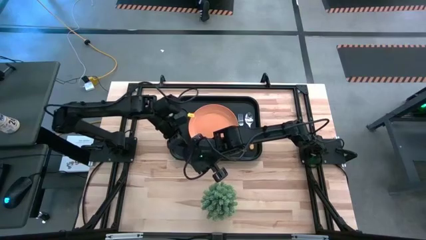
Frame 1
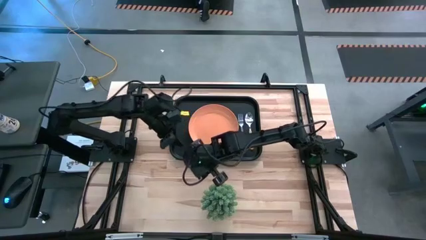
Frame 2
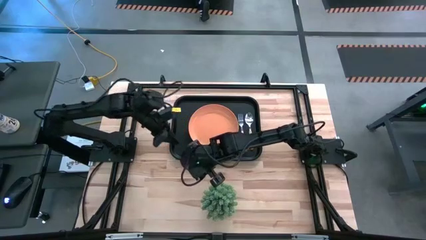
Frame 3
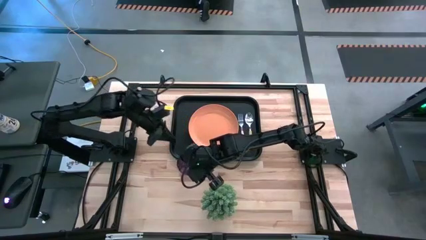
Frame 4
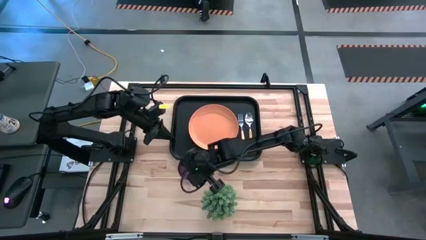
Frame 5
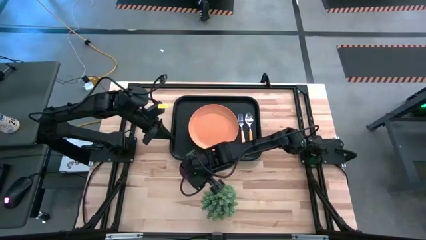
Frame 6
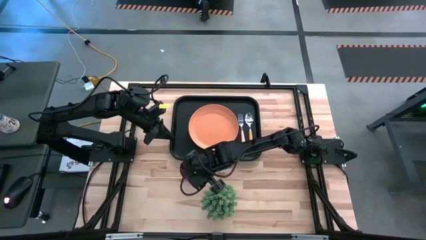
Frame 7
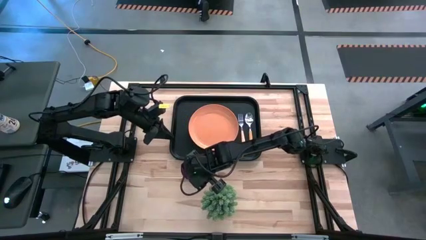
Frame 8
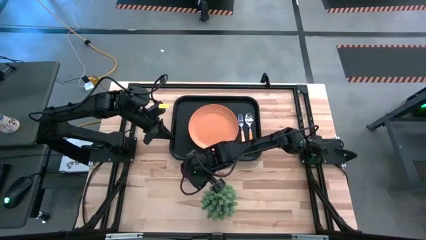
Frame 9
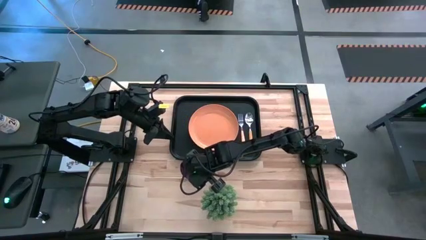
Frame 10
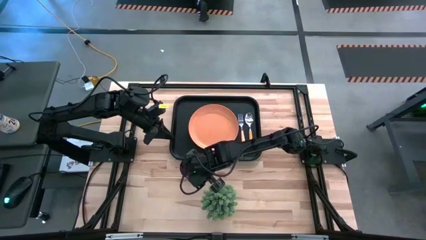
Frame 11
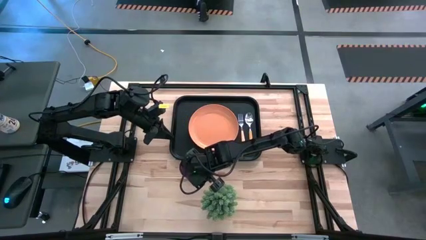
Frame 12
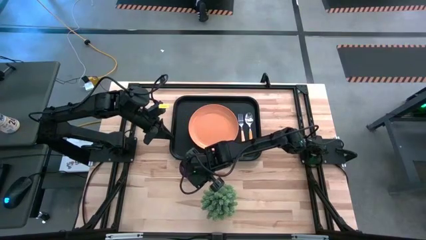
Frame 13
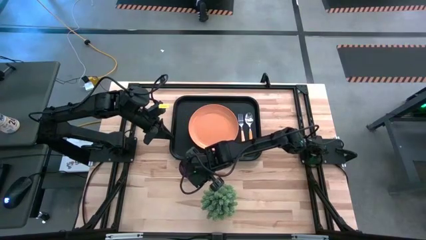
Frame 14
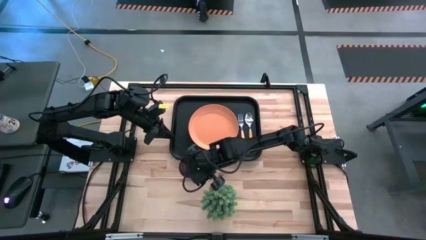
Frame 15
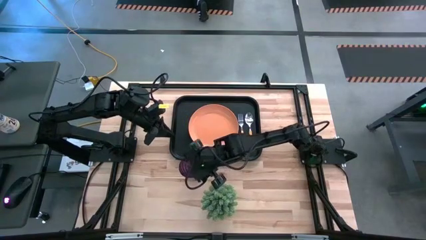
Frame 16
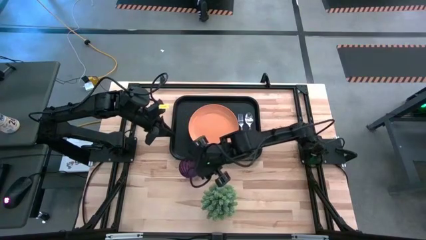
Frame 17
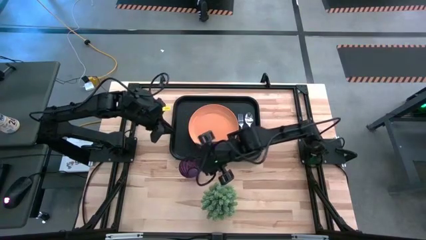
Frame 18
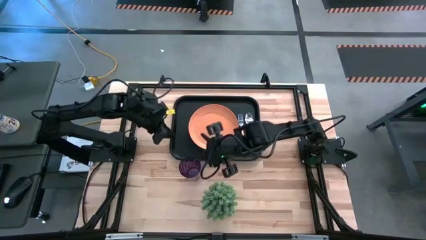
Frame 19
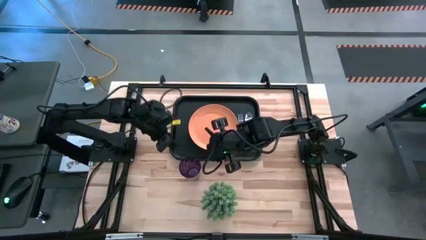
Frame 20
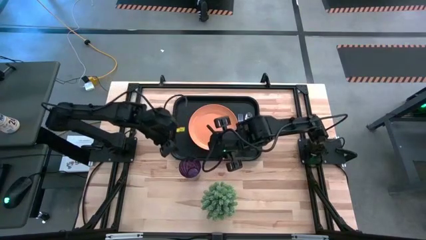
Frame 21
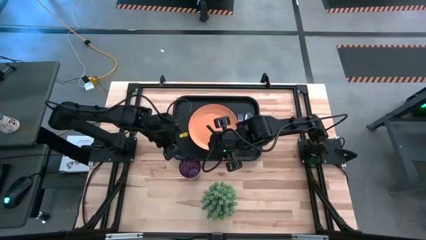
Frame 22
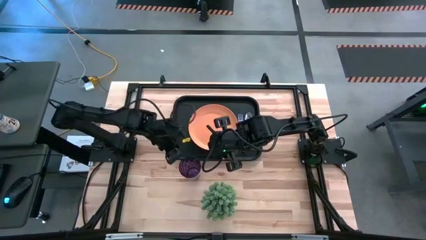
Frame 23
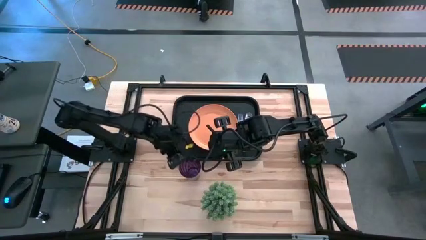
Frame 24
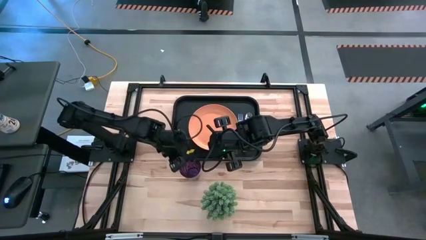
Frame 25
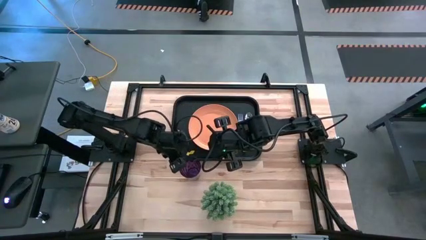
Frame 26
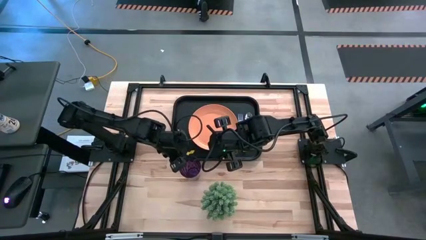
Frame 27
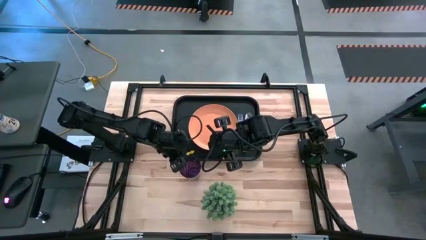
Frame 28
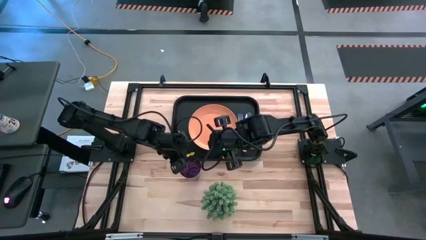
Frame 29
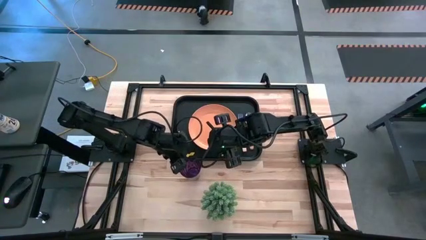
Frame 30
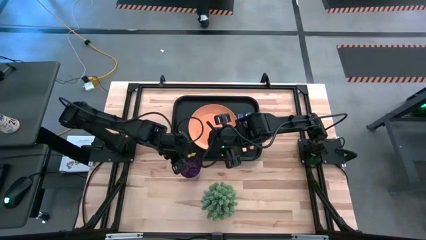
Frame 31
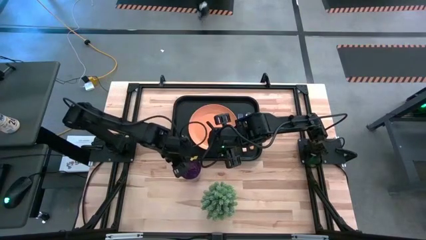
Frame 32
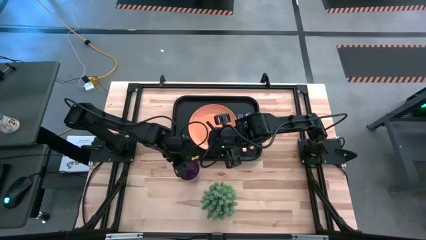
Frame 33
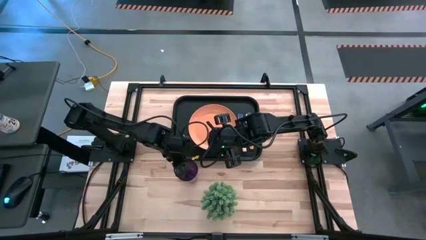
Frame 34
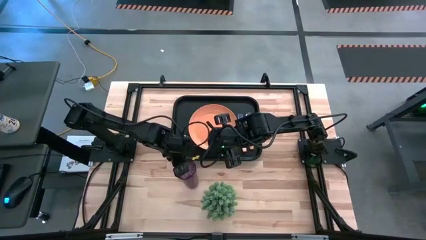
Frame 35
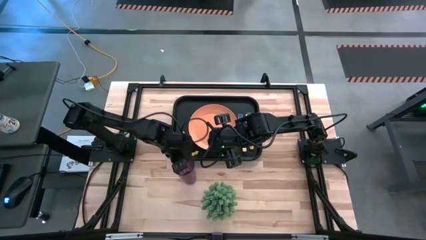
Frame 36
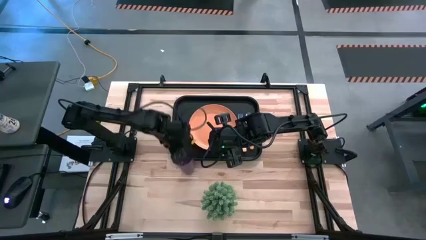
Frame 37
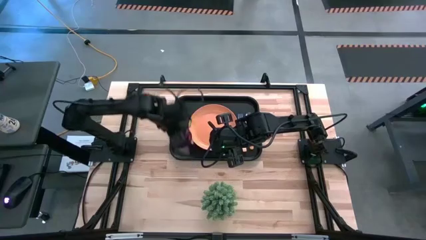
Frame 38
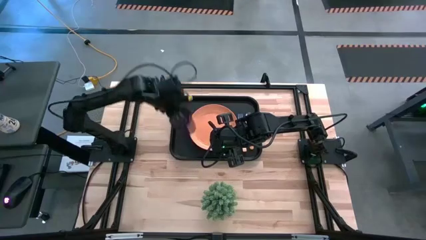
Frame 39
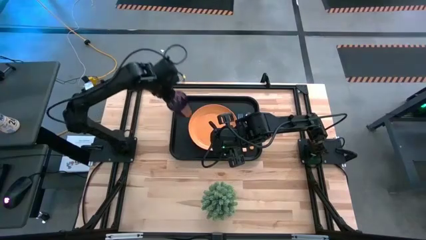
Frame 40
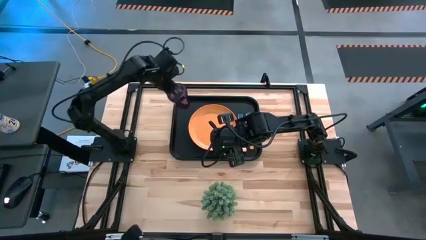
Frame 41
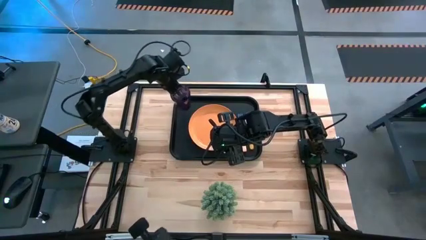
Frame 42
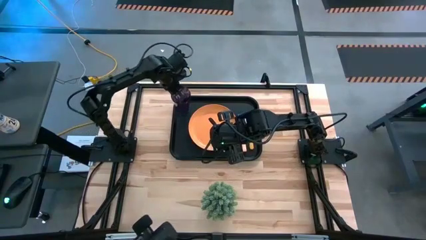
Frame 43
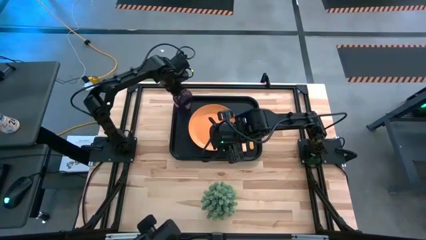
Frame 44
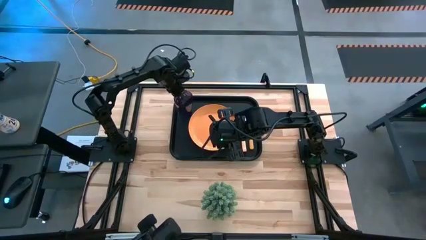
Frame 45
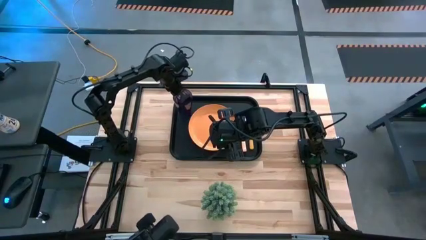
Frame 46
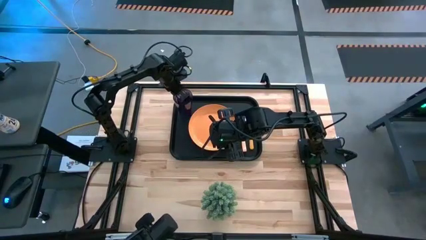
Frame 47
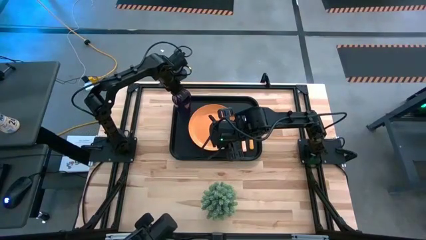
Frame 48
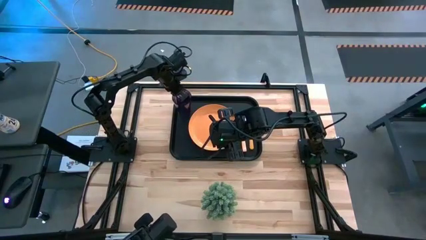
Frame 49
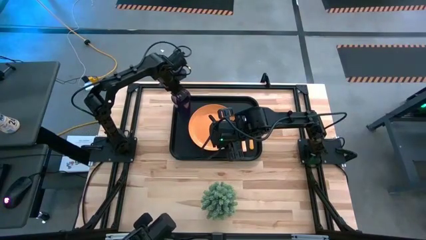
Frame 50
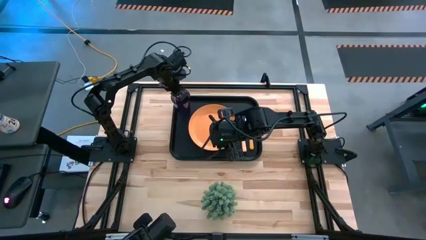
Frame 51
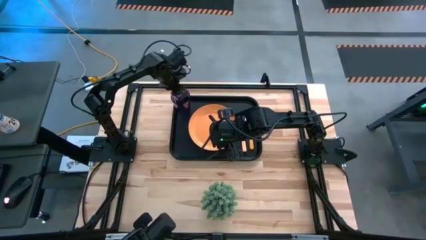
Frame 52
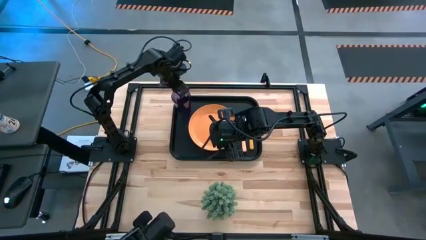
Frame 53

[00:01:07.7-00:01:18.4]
Task: Pick and place plate/cup/fork/spoon on tray
Put the purple cup on the black tray

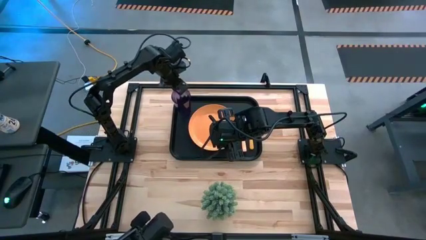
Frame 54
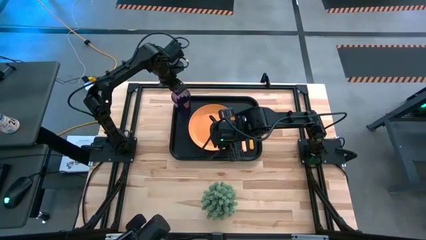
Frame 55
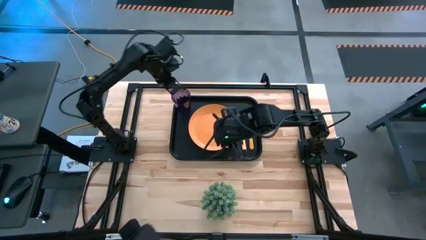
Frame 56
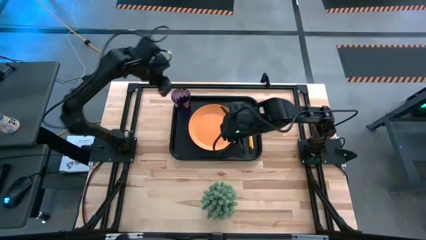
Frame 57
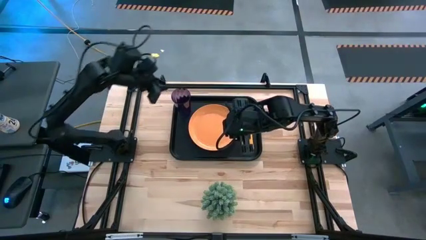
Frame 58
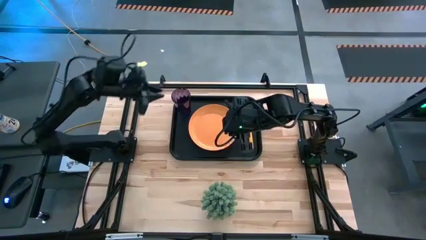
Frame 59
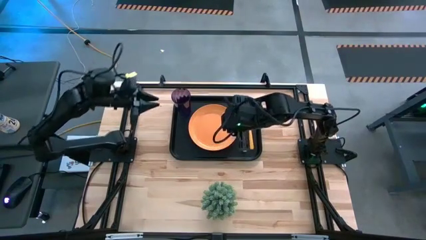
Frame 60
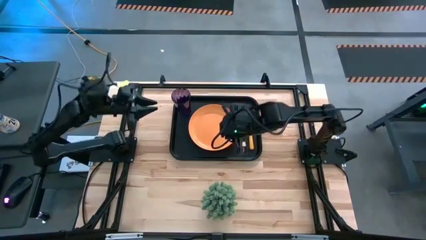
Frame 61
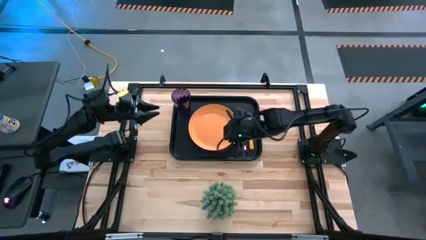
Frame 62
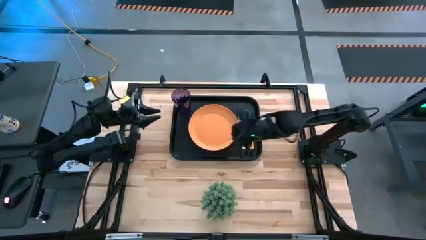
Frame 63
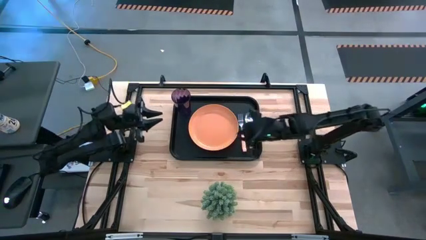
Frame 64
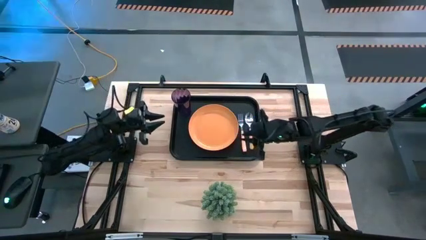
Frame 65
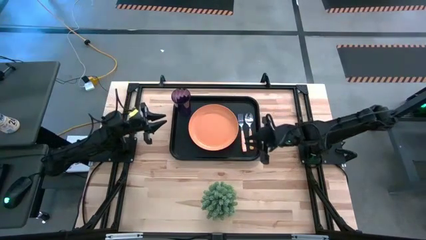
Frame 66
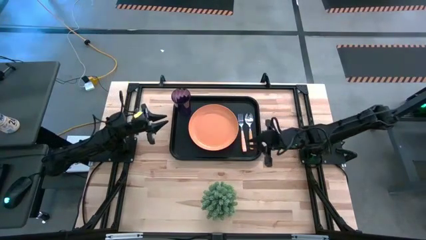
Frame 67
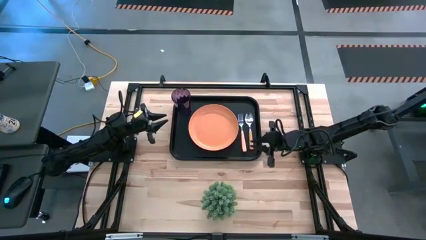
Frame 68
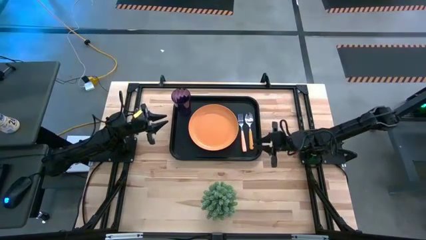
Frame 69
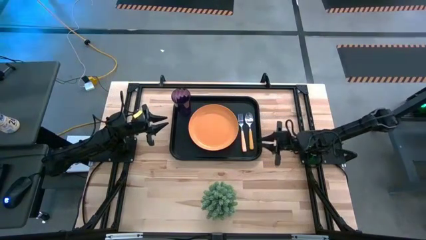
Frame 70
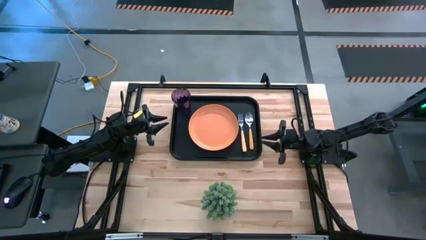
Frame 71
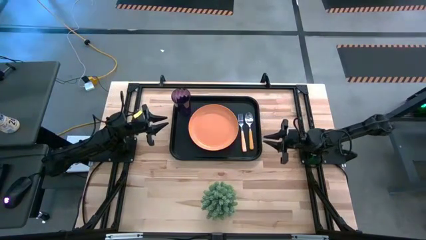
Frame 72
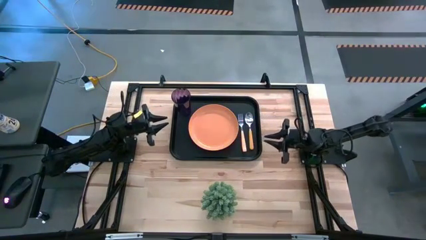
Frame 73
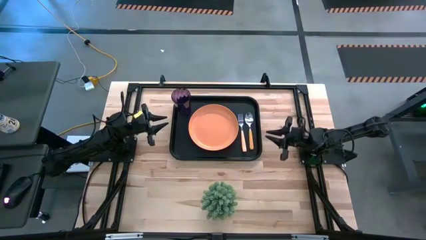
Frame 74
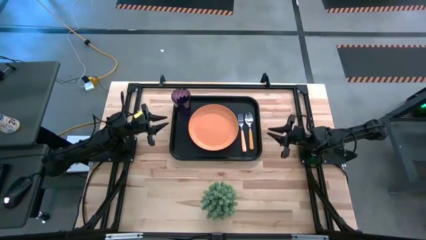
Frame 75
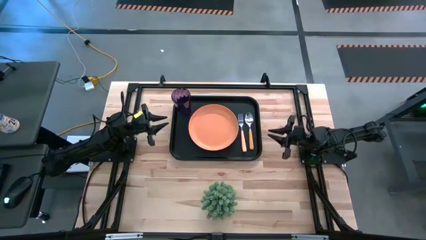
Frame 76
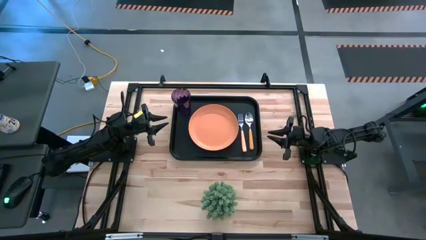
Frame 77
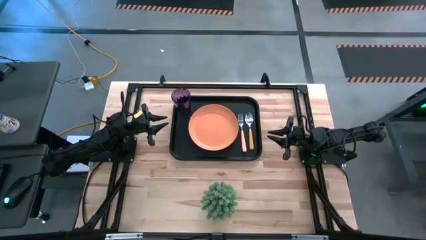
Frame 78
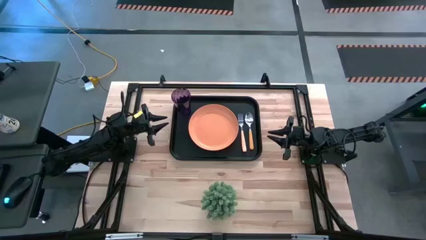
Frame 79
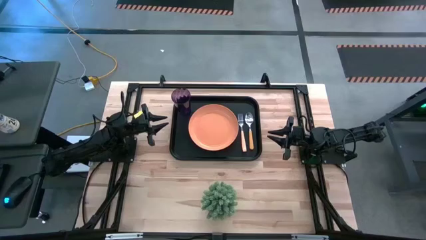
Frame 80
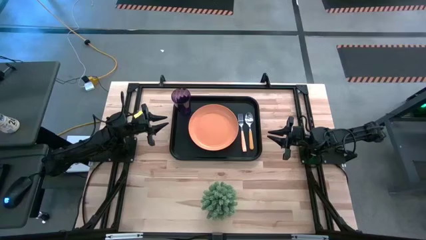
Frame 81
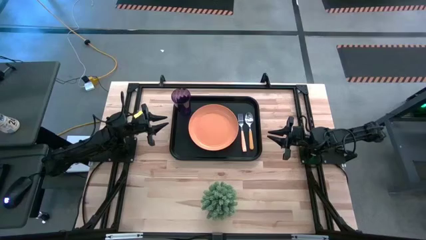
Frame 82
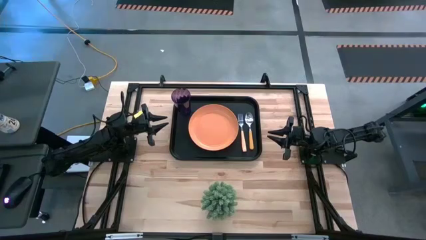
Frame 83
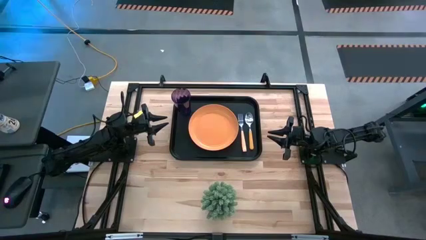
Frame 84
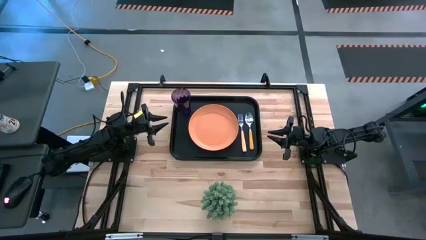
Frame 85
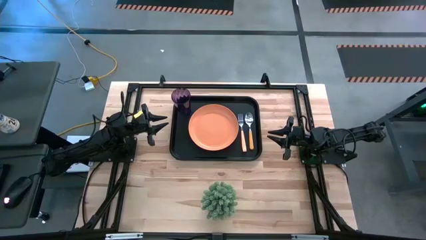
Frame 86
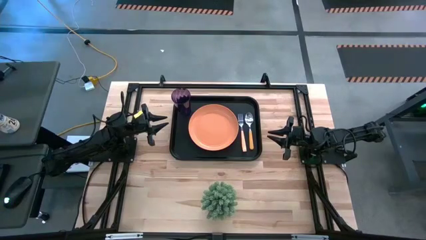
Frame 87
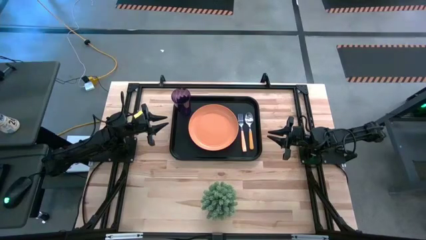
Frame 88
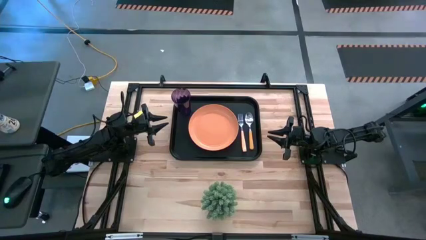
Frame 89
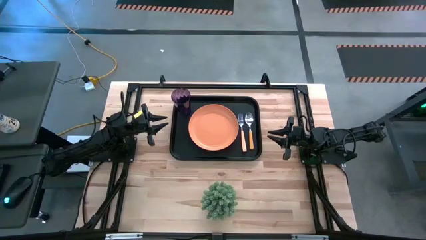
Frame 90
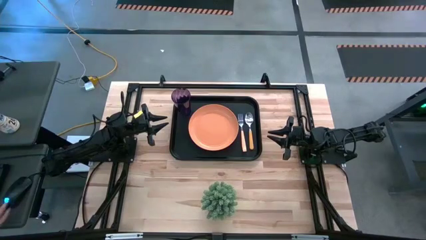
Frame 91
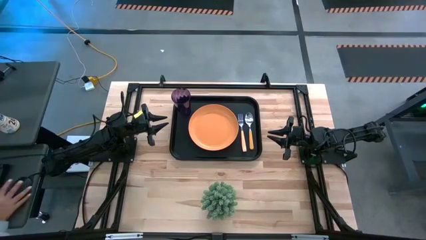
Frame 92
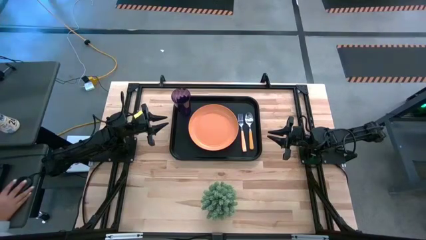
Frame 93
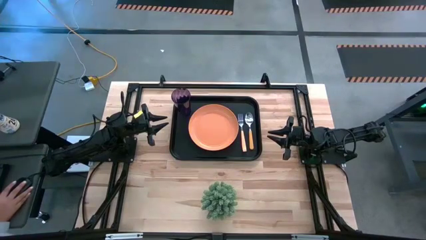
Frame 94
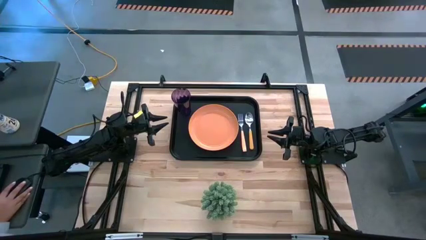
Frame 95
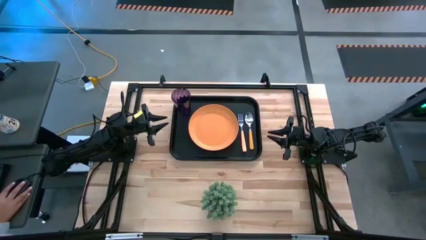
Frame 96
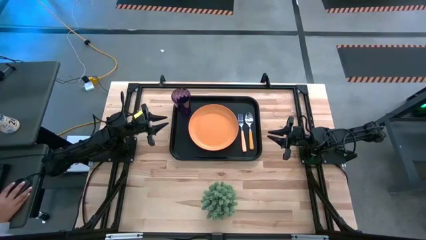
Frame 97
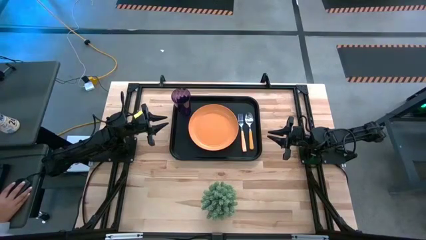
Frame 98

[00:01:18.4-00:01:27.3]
Return to Home Position
